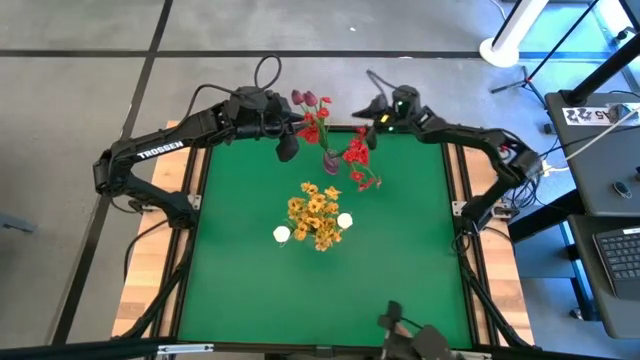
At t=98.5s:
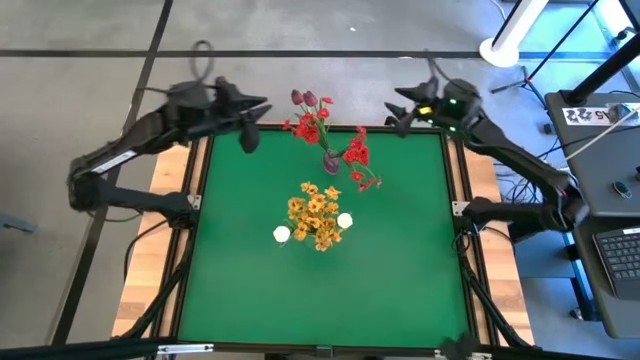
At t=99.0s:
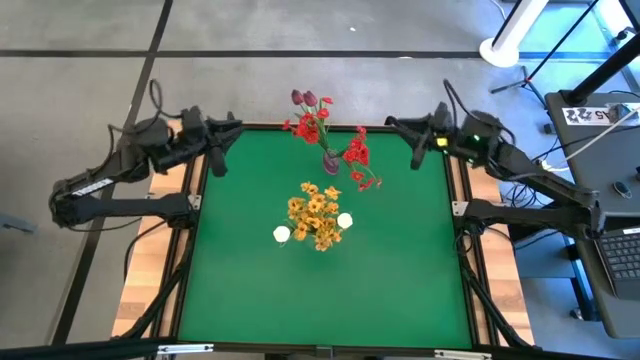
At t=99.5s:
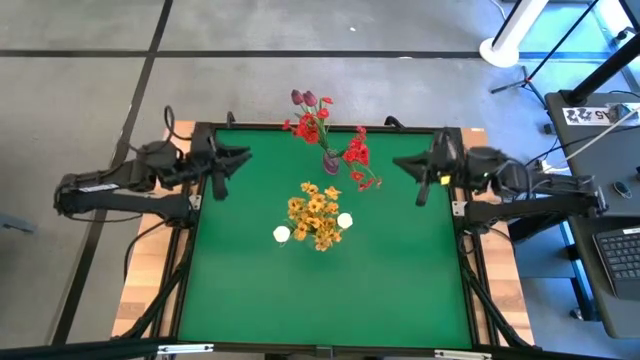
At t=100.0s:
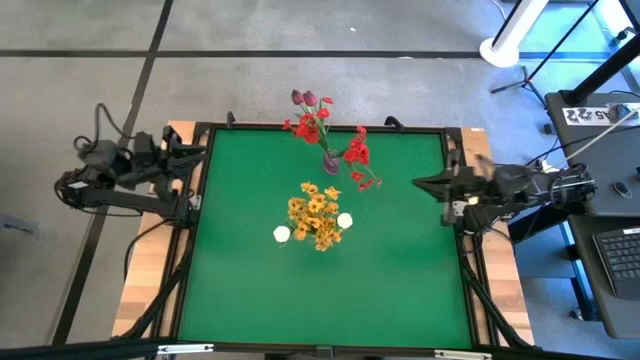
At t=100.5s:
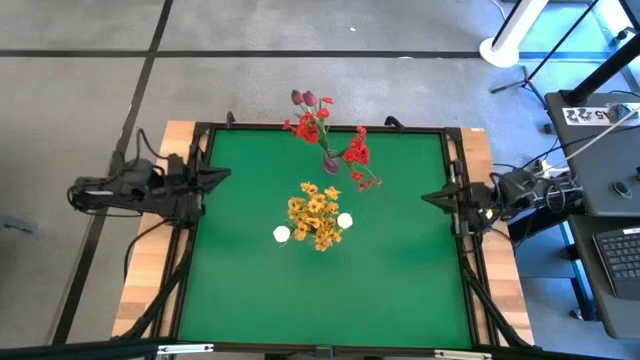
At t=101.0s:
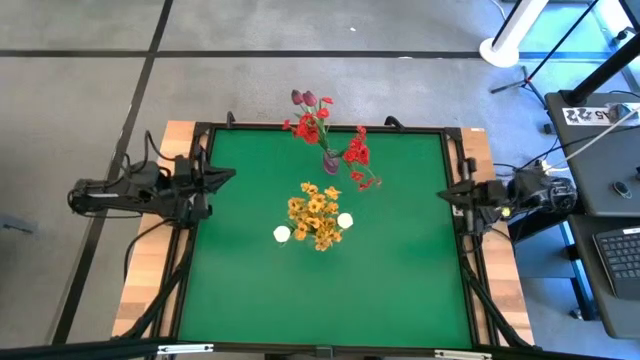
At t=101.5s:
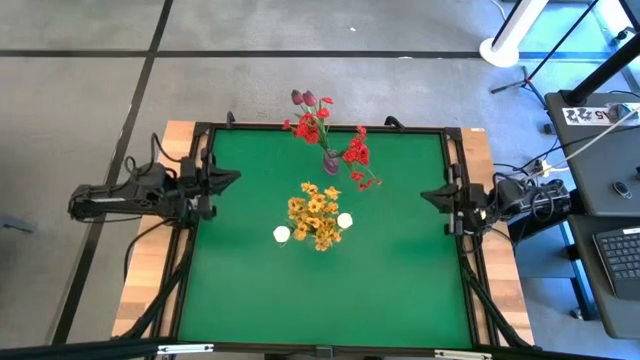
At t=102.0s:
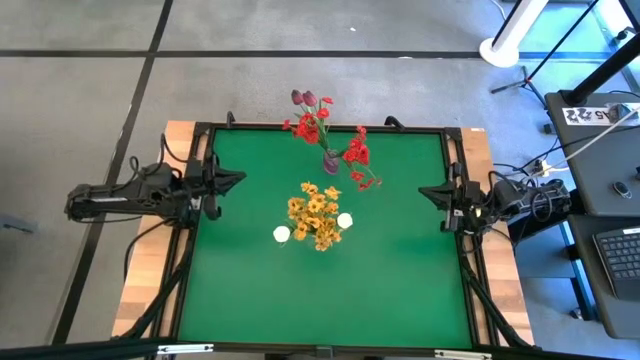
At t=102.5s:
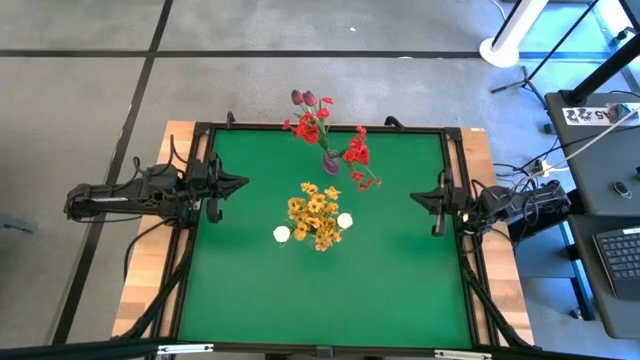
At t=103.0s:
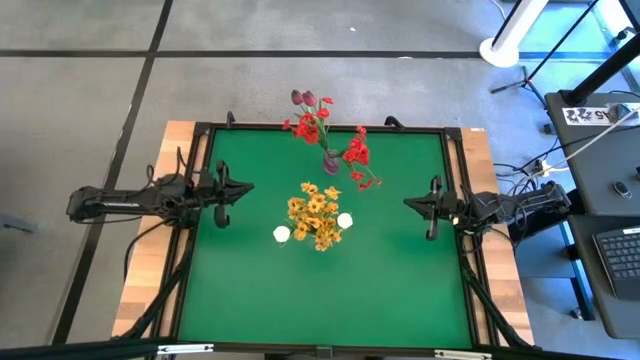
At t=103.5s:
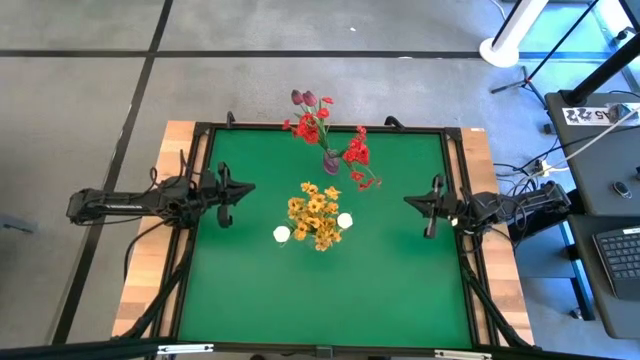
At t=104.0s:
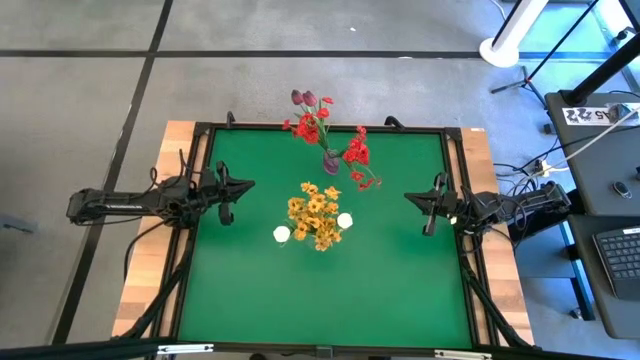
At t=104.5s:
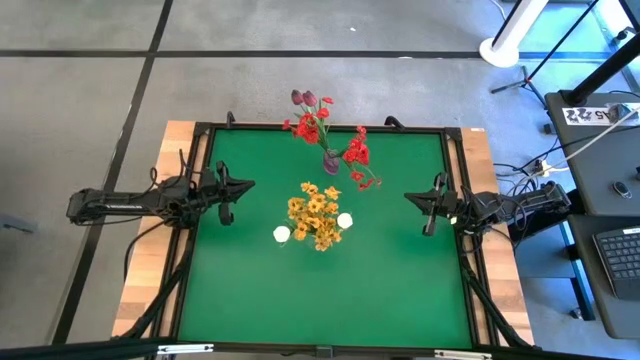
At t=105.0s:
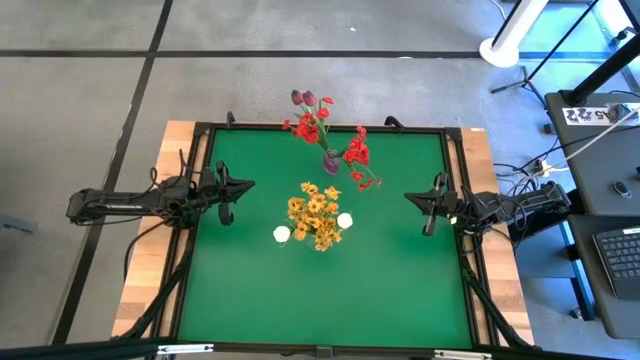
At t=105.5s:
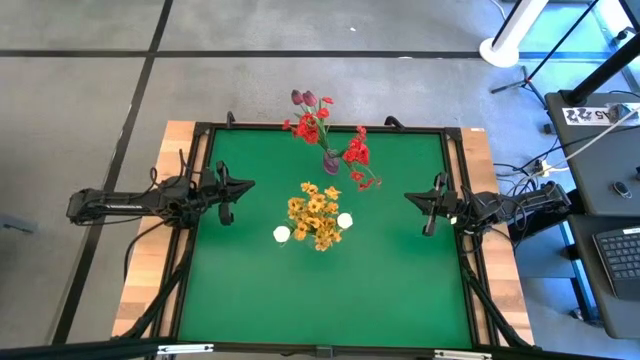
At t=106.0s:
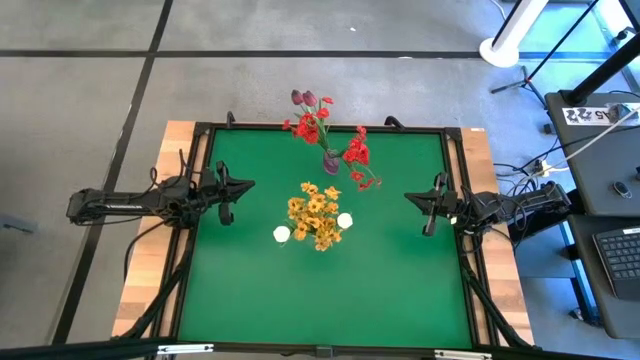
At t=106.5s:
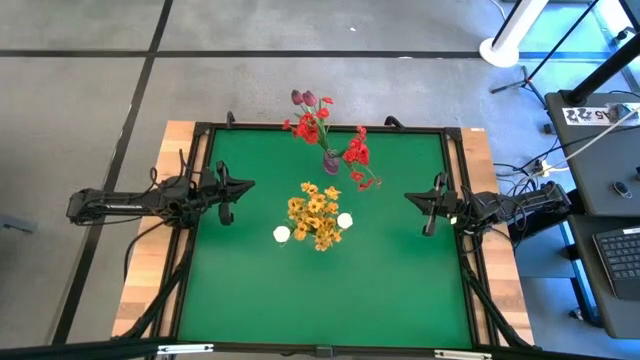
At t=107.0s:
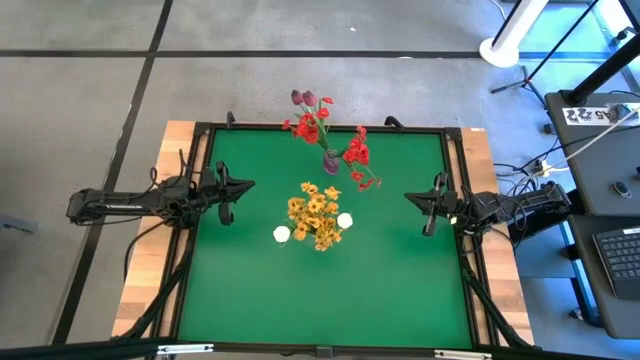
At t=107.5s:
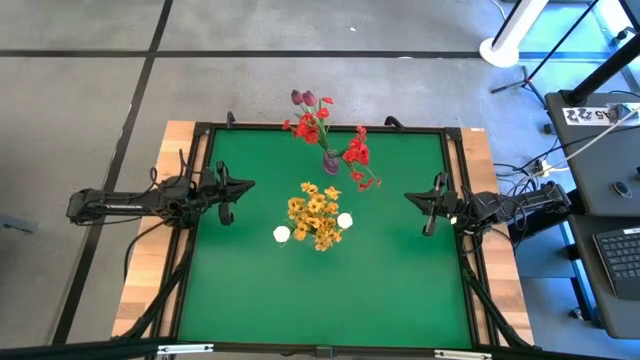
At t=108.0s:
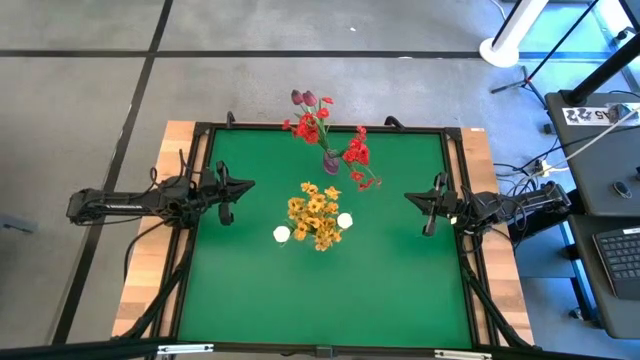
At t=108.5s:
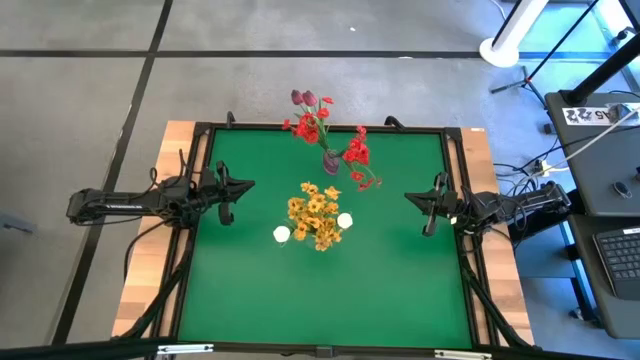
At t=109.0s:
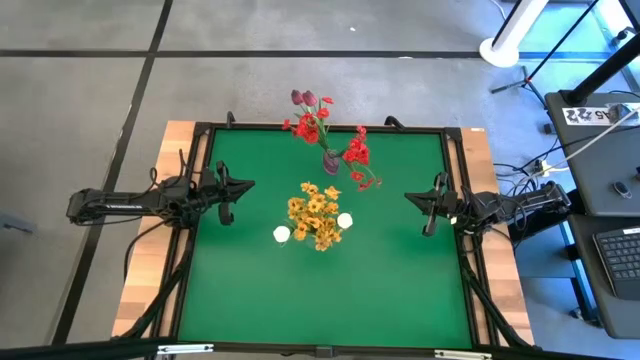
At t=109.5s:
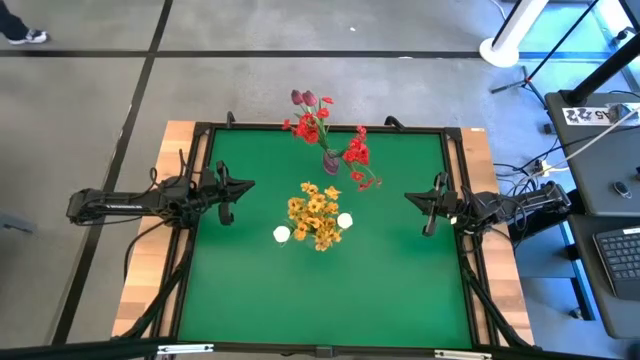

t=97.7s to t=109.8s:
Task: Sort flowers into vase by color
Return to Home Position

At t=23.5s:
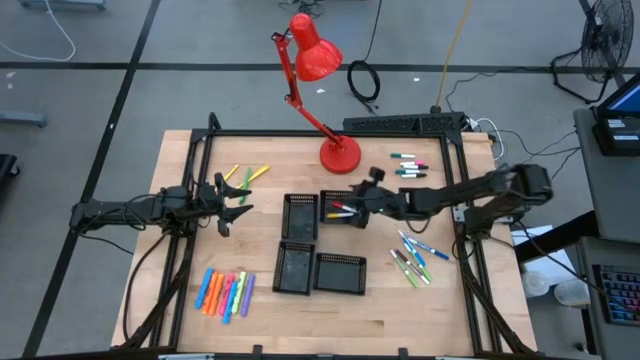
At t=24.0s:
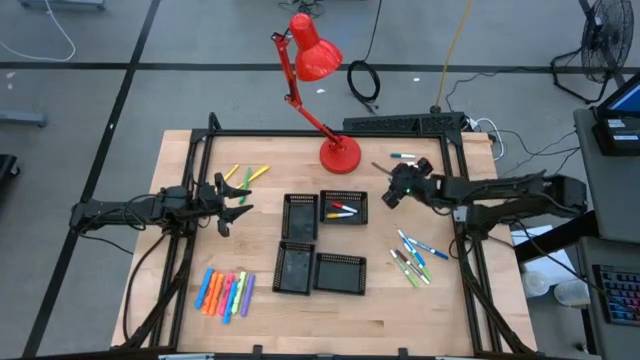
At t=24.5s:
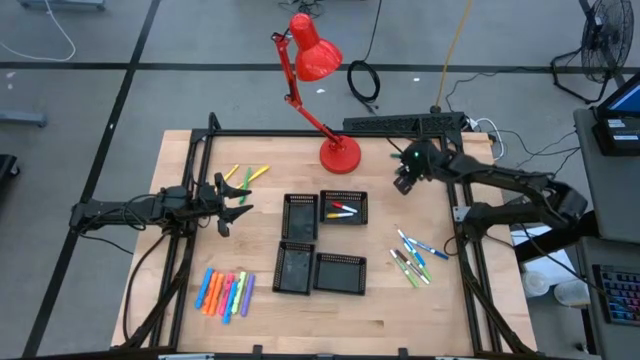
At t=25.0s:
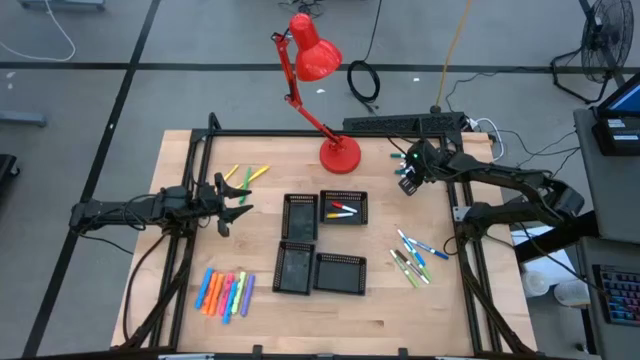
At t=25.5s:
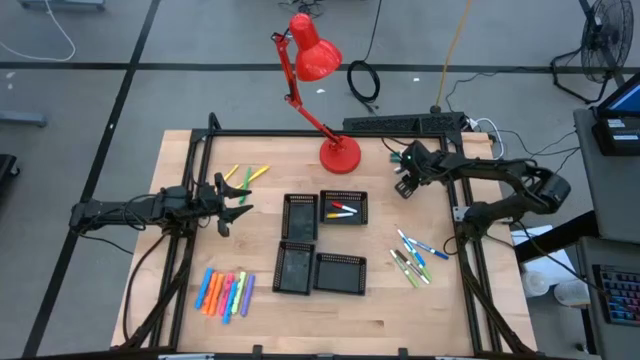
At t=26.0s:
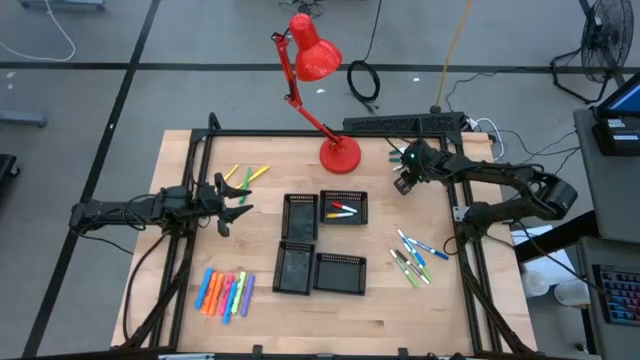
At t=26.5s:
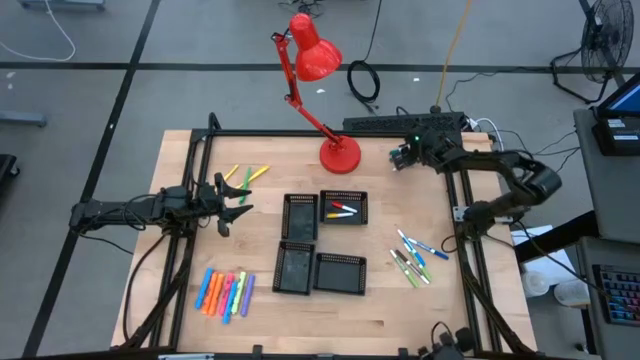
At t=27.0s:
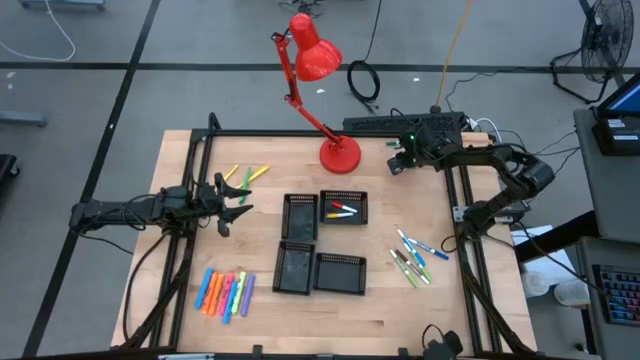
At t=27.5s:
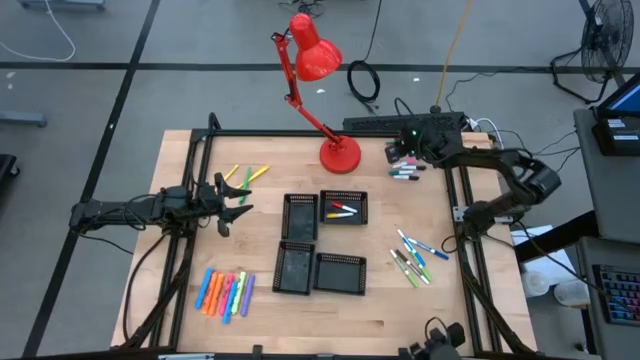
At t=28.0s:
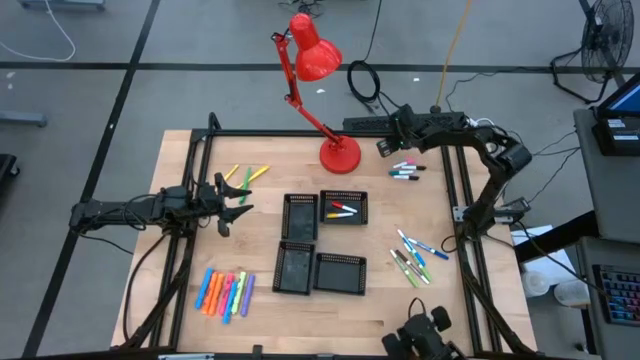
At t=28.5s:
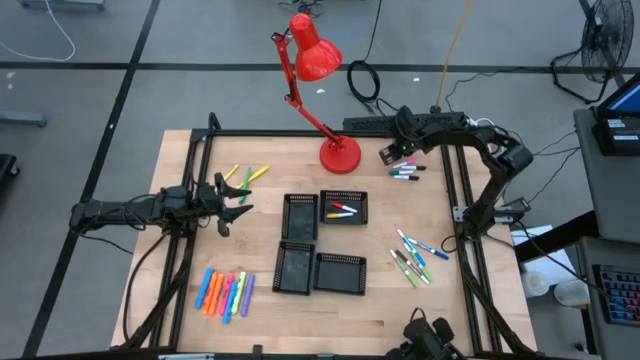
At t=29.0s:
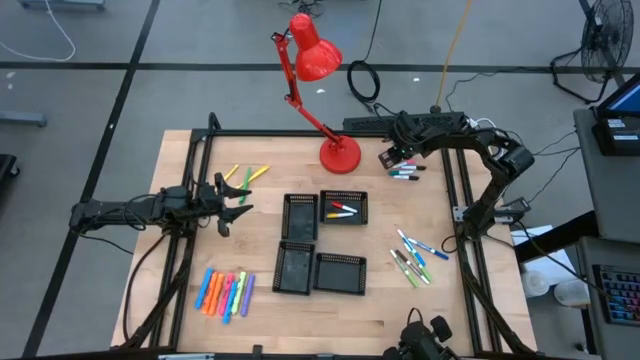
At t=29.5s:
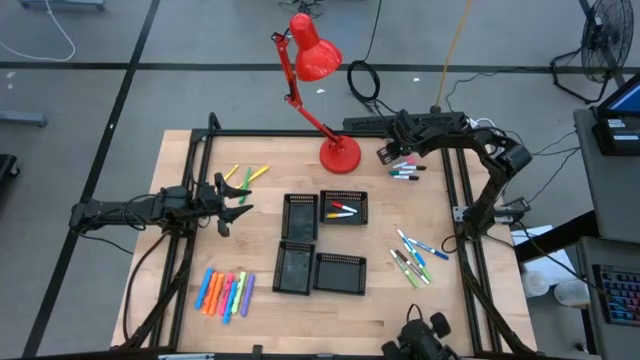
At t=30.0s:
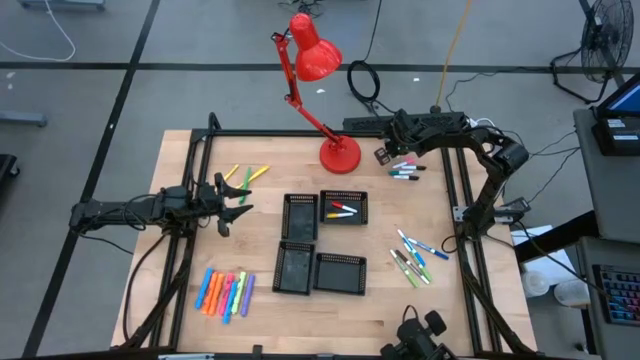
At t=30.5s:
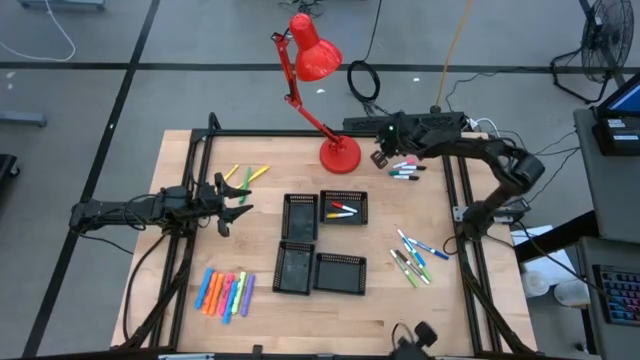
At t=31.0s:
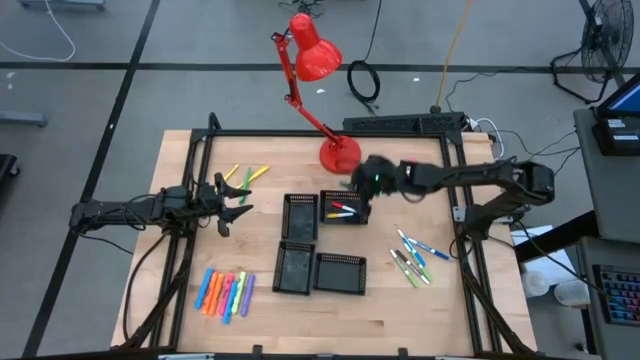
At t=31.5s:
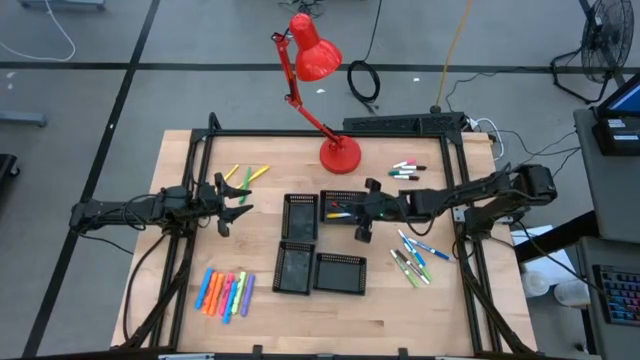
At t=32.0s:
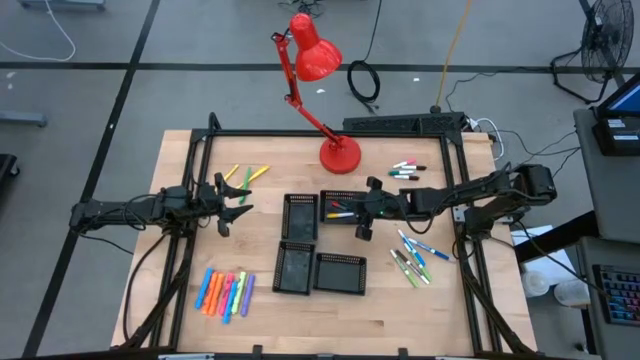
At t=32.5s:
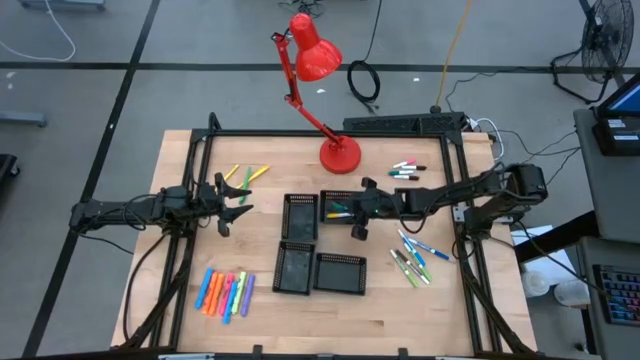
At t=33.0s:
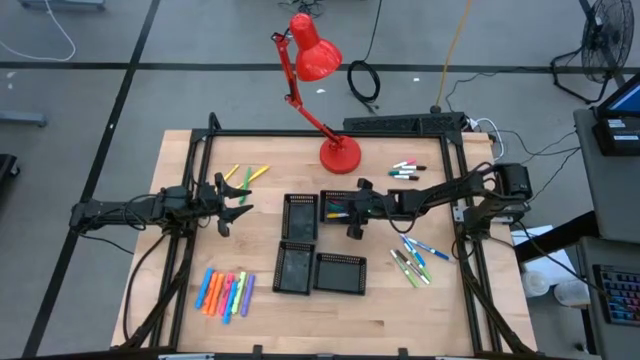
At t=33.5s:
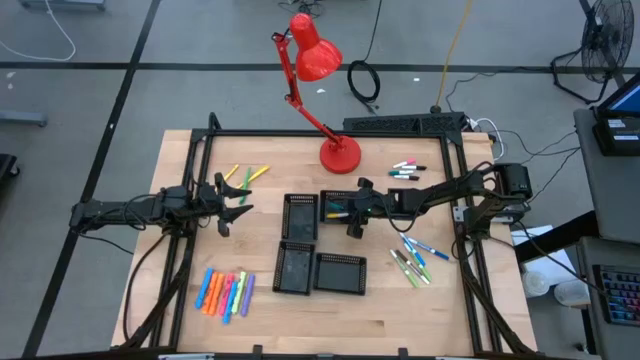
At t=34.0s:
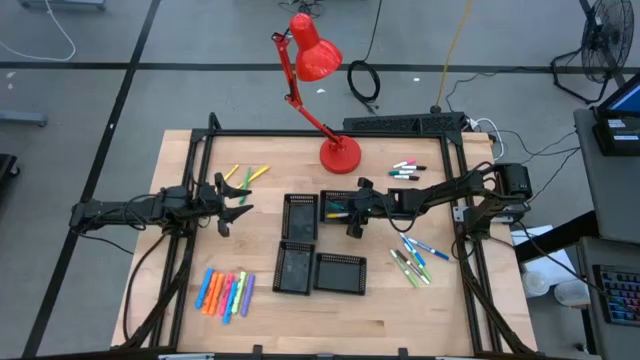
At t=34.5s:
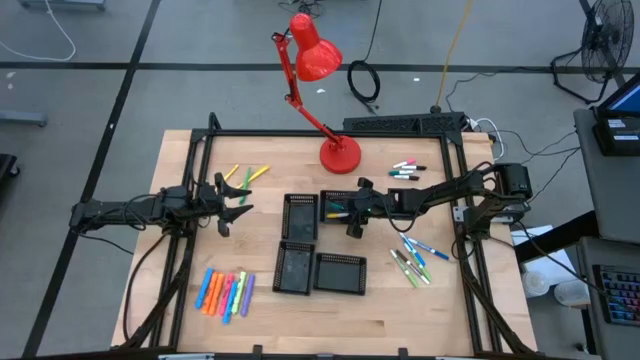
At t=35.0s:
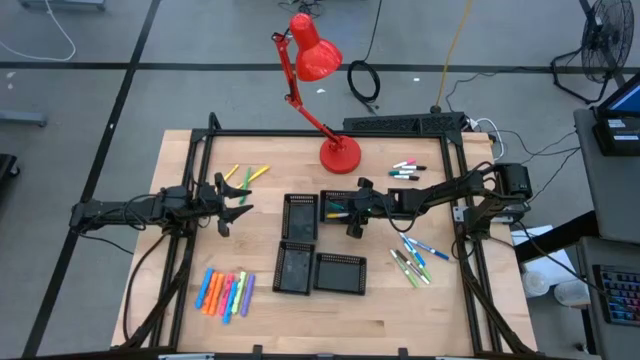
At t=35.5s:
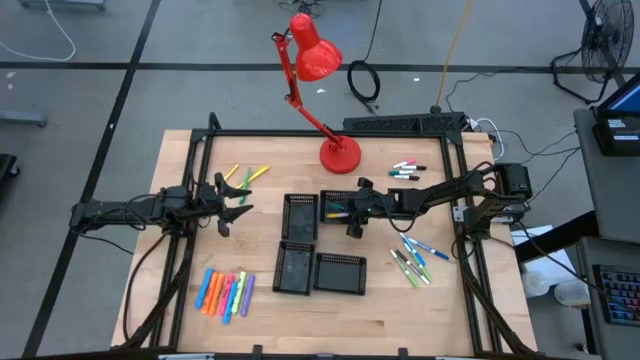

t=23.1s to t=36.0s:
Task: Pick & Place Markers
Put the dark blue highlighter pen into the top right black bin
